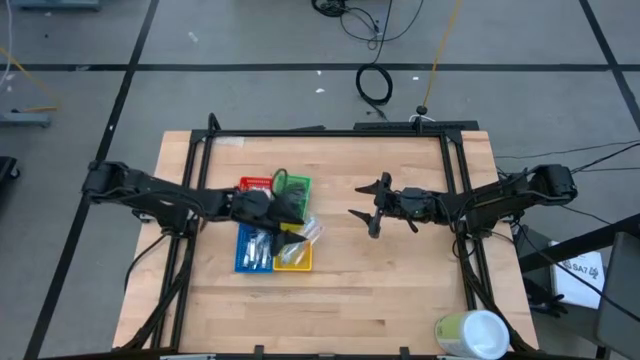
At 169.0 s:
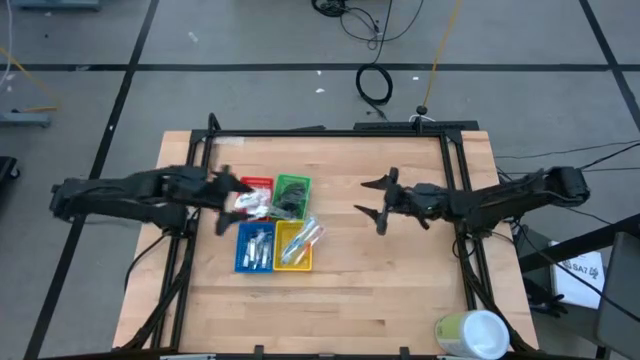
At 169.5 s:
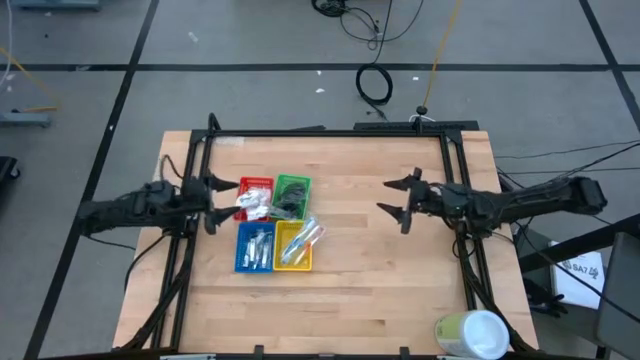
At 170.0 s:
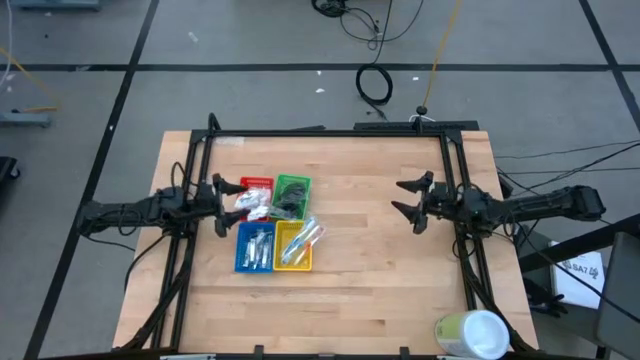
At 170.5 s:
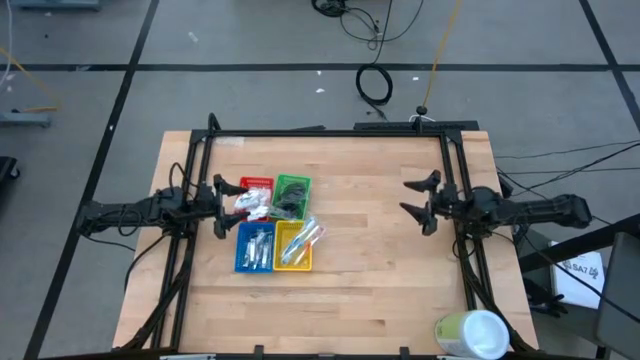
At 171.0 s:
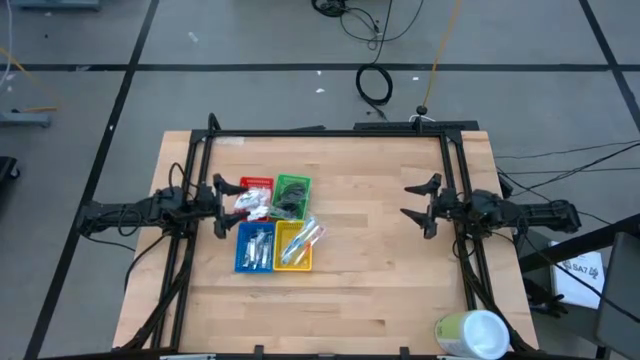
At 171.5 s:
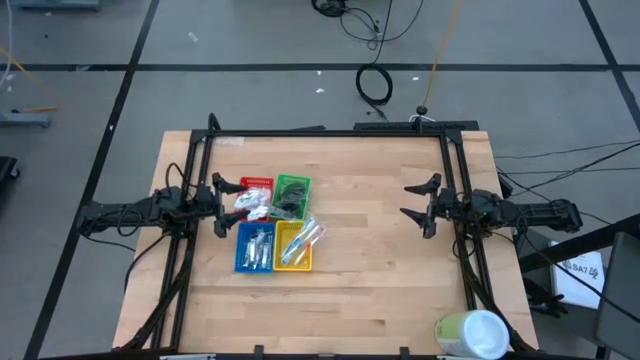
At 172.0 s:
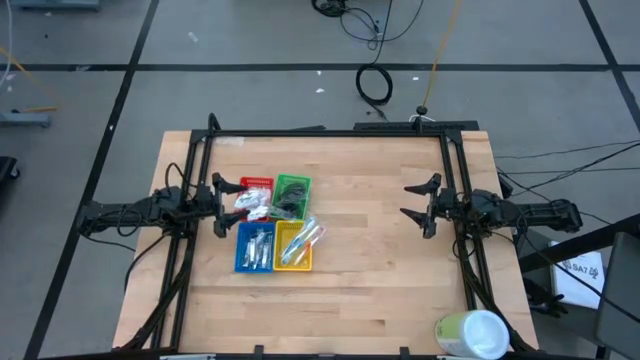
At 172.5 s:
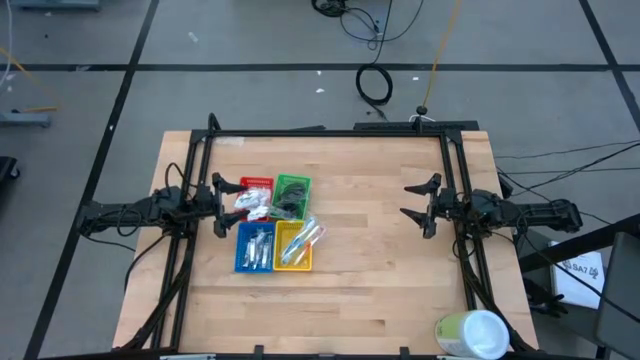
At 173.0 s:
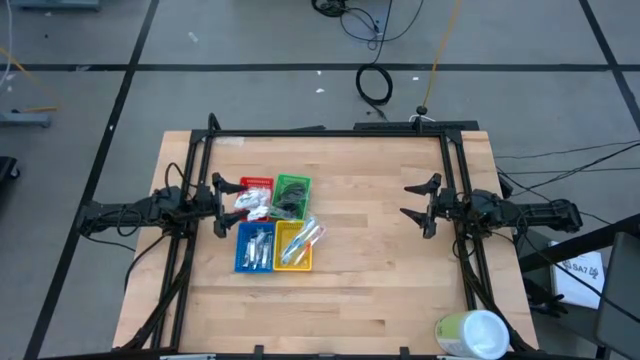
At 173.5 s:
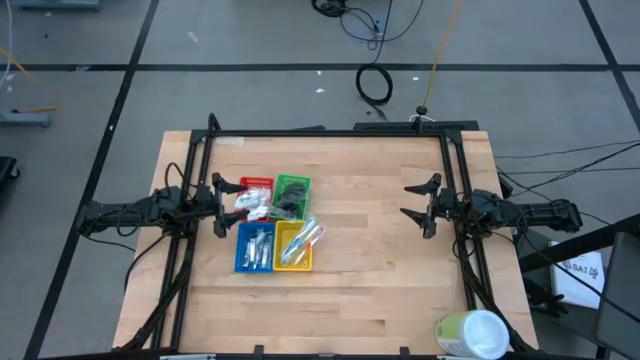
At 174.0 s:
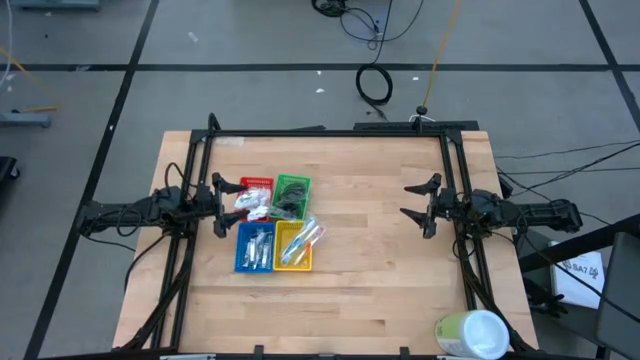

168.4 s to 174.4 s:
Task: Pick & Place Travel size toiletries
Return to Home Position

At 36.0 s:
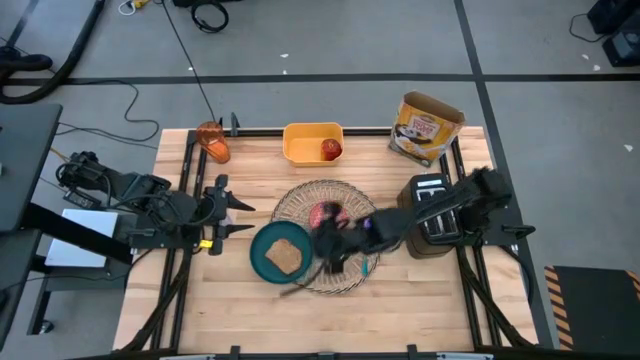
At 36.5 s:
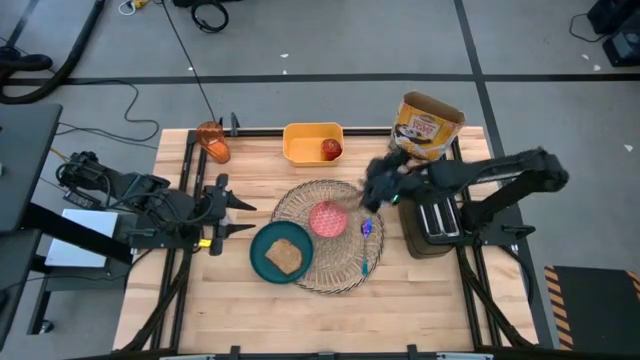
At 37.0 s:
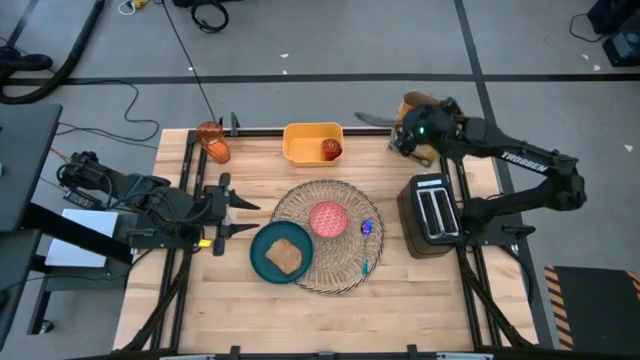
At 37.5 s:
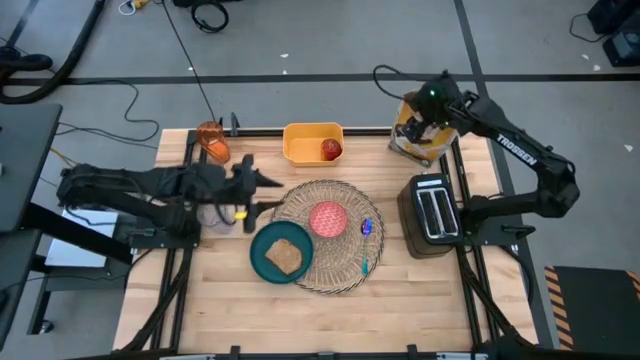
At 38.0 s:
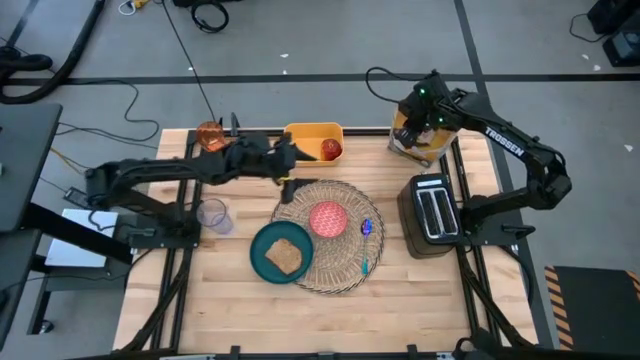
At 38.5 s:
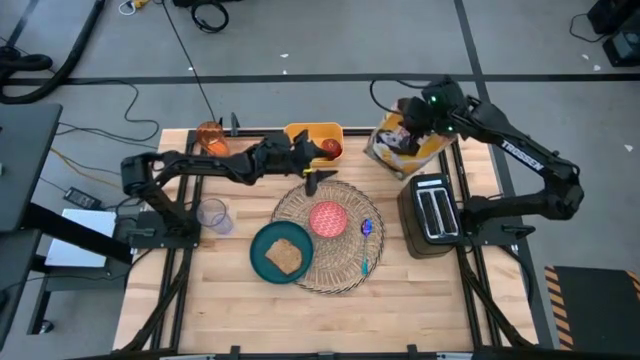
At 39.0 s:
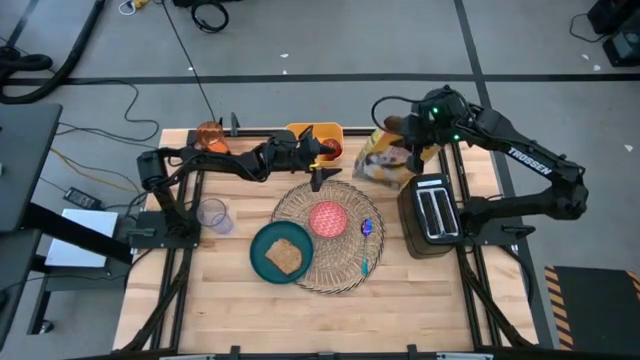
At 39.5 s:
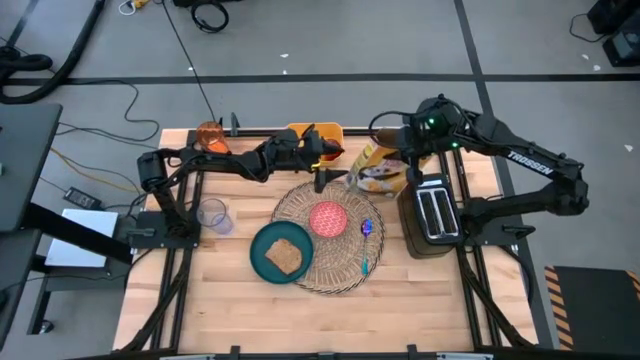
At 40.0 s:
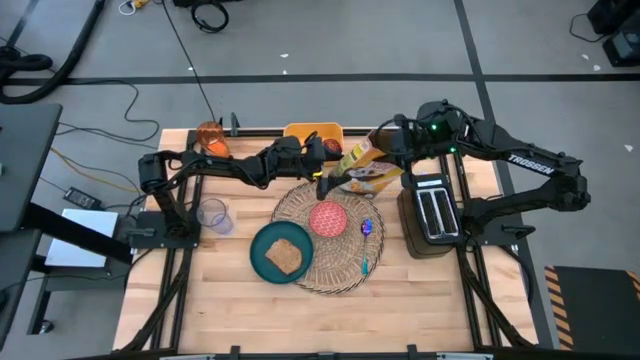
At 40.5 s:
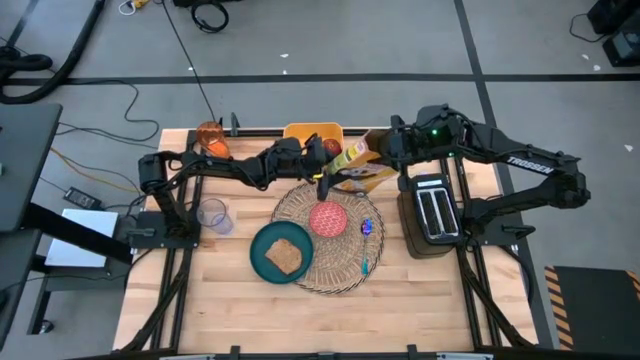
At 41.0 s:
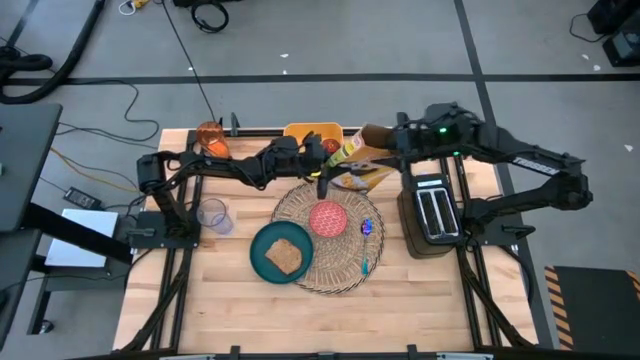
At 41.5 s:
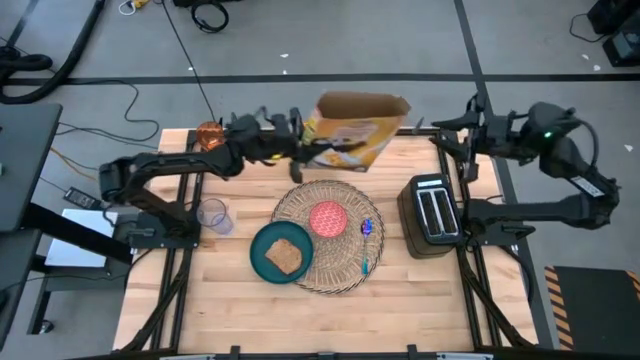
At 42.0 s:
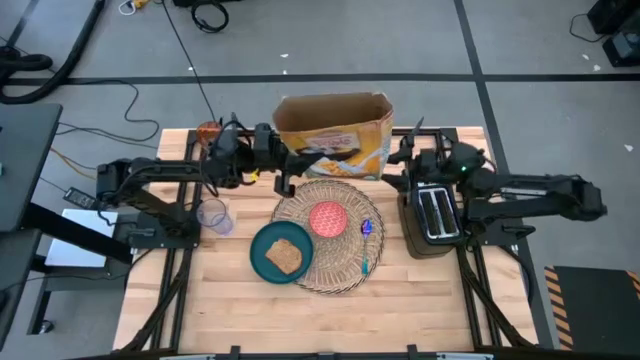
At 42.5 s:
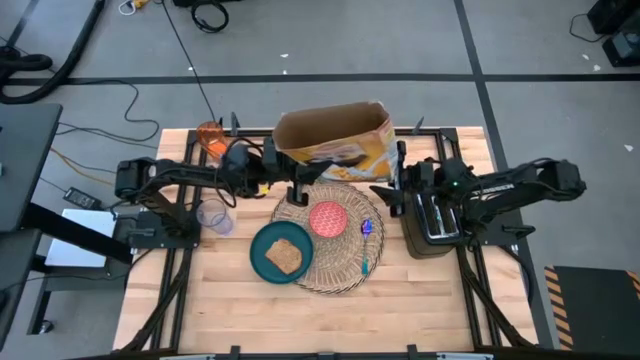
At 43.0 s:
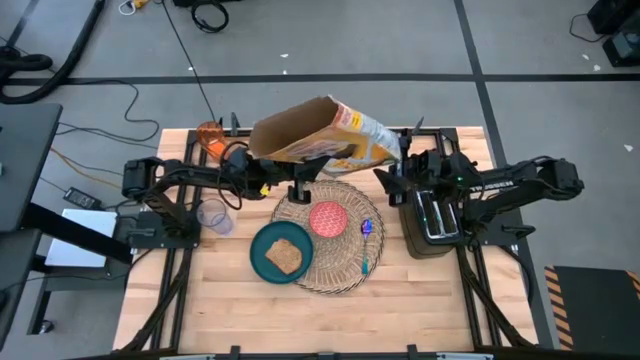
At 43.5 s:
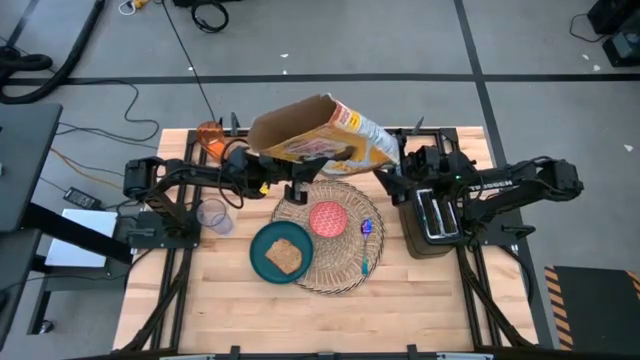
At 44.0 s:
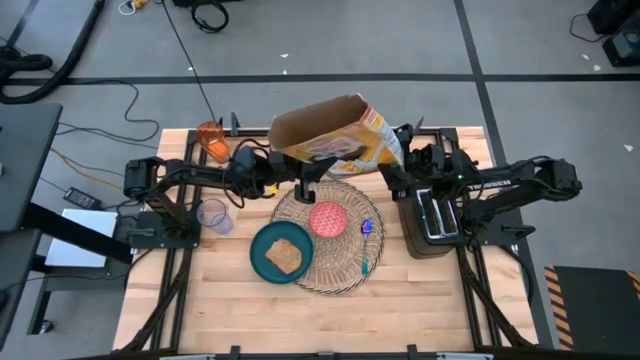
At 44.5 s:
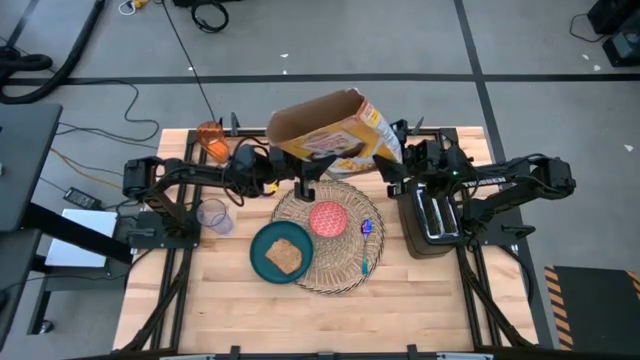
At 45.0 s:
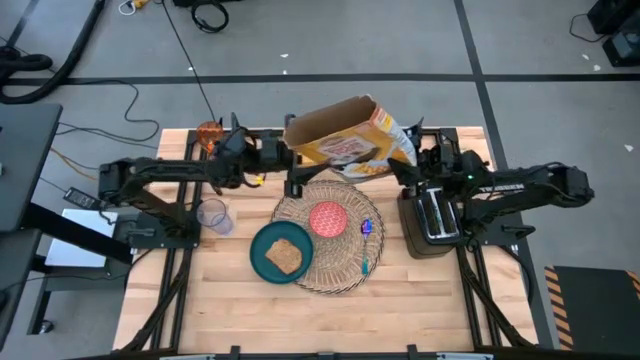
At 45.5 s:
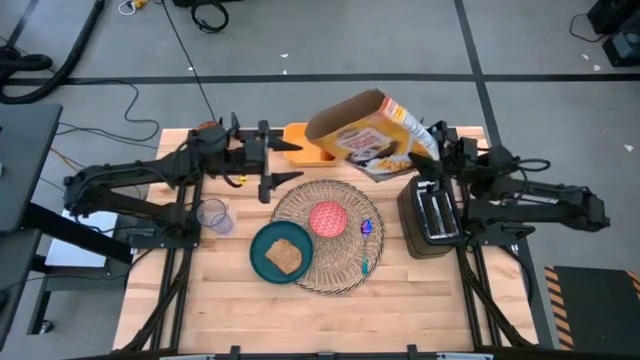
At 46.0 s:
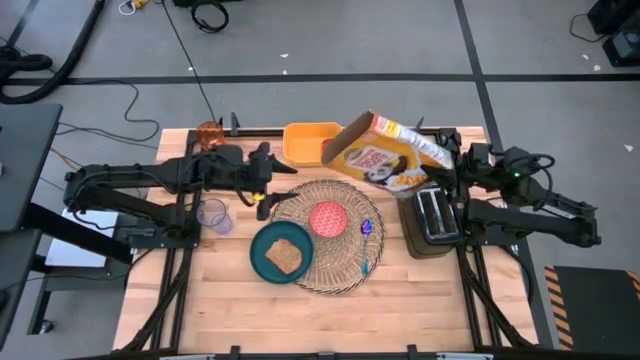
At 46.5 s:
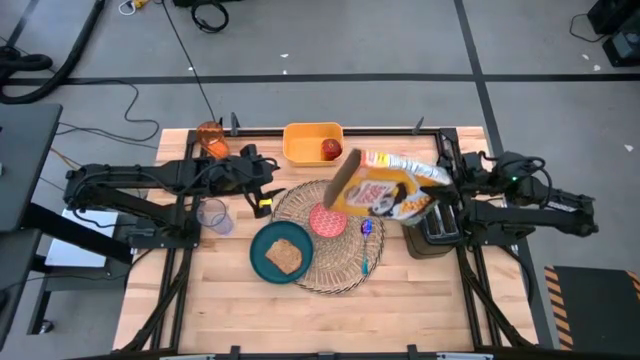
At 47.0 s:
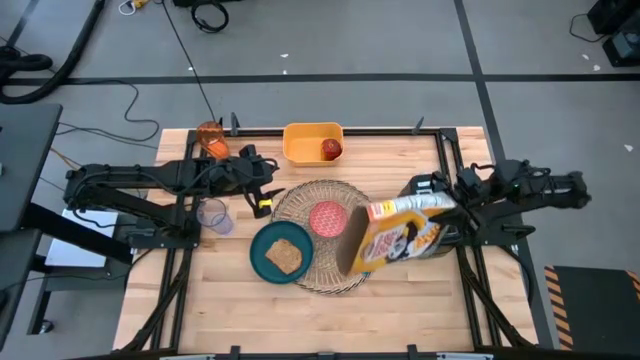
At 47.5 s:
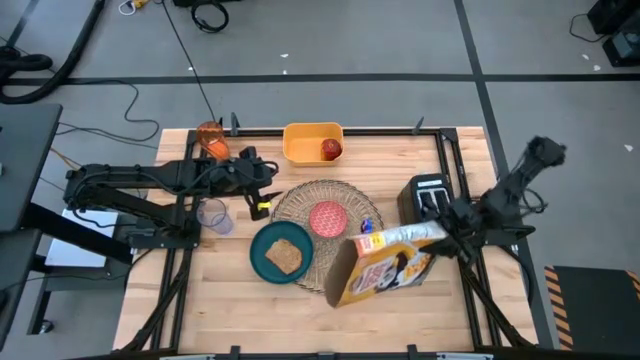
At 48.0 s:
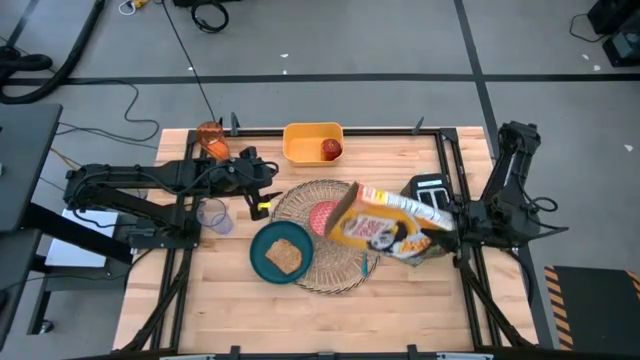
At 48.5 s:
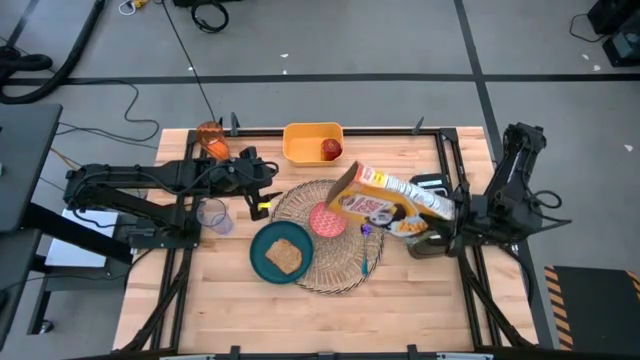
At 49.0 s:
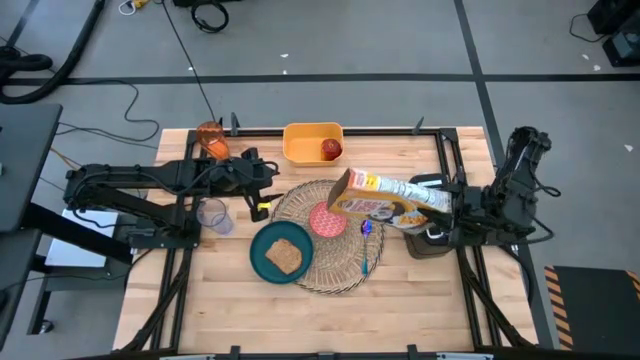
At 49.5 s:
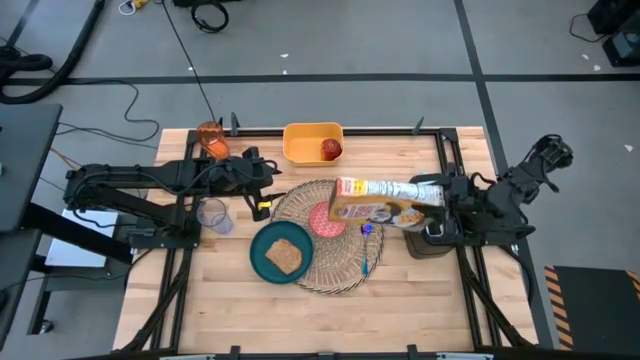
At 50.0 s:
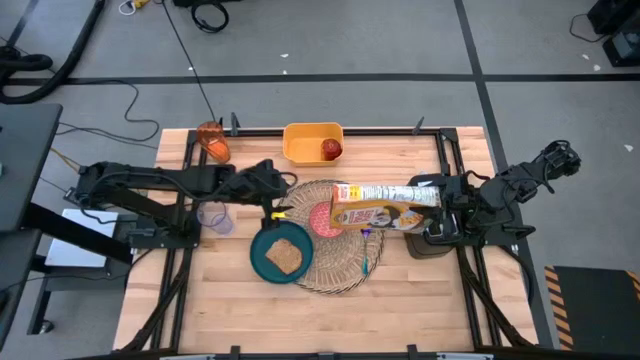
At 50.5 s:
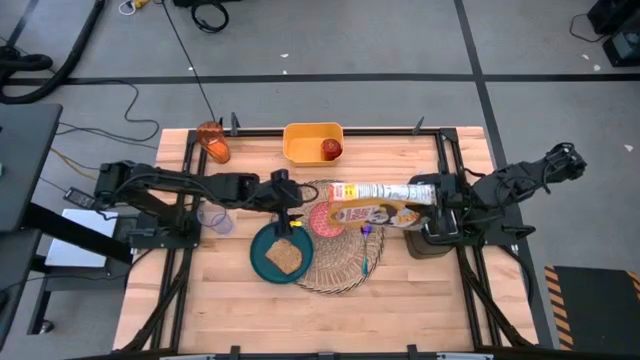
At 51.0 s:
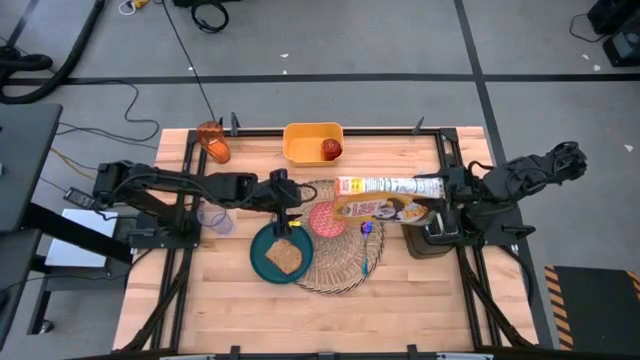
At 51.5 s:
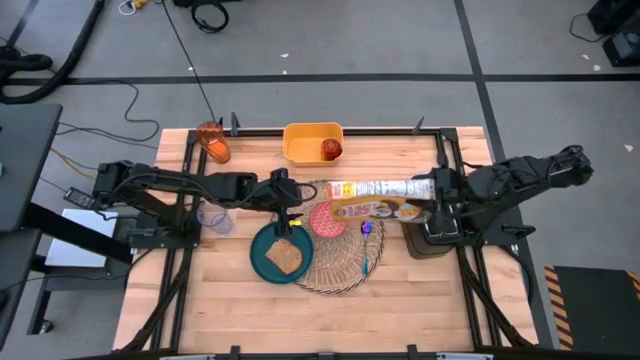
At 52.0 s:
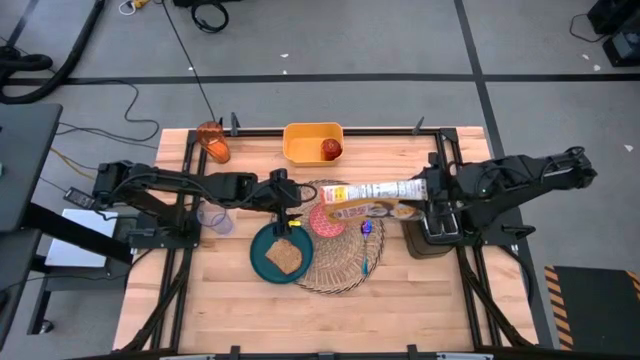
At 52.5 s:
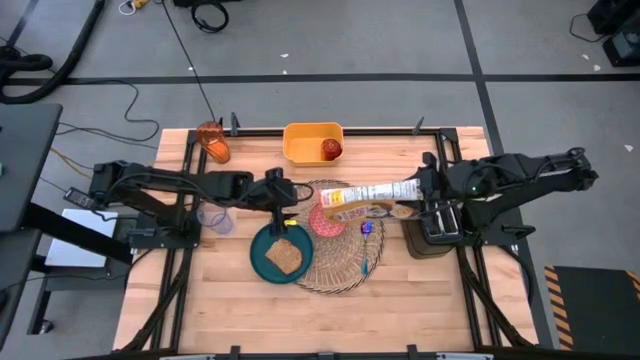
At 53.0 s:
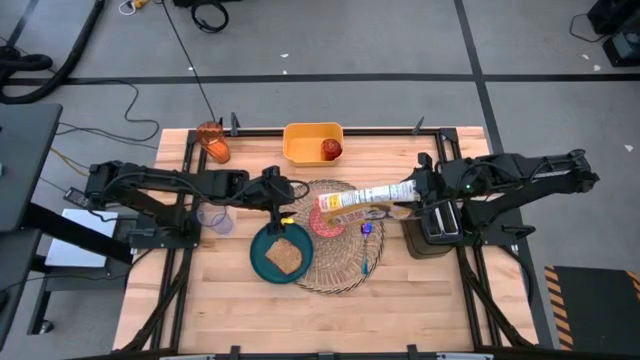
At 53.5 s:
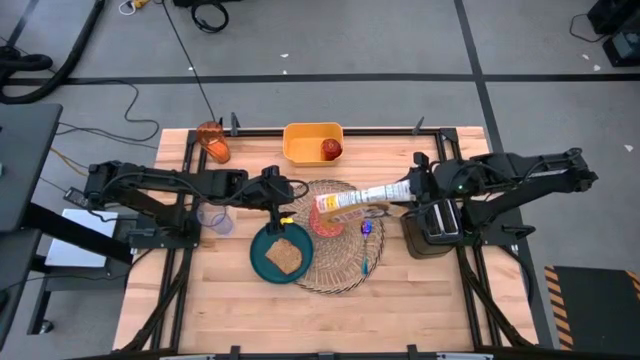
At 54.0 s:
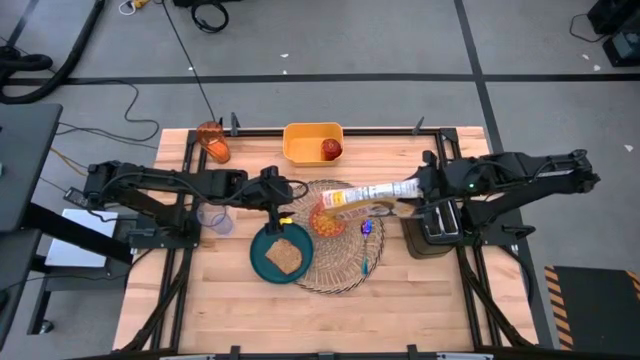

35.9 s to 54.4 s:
Task: Arrange a breakfast setting
Pour the cereal from the yellow cereal box into the red bowl
